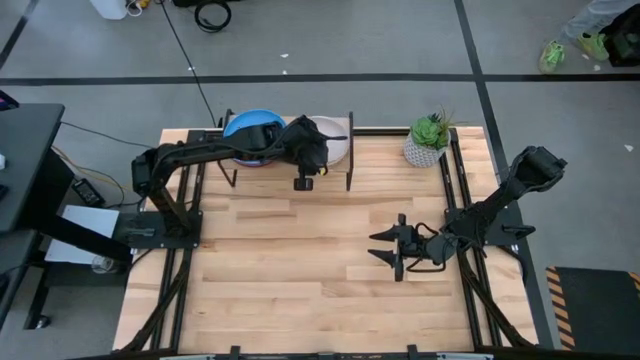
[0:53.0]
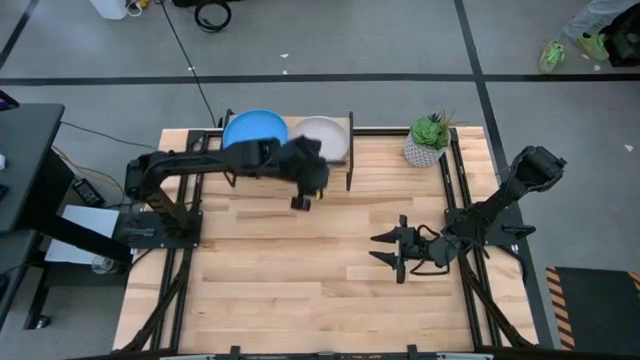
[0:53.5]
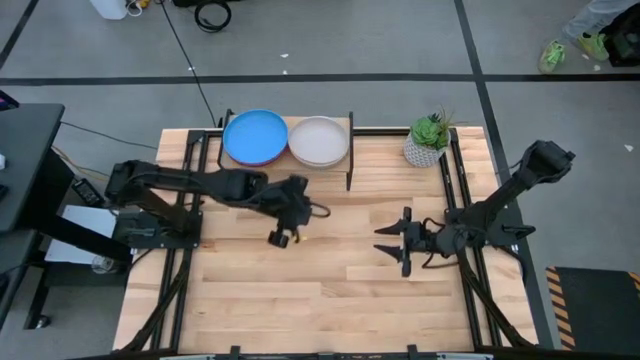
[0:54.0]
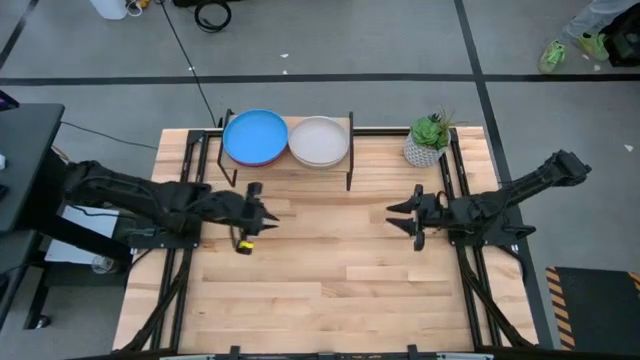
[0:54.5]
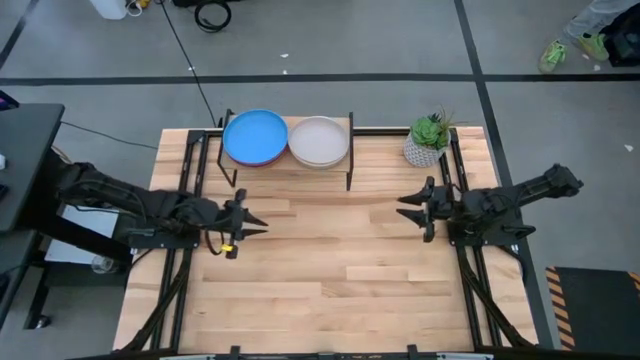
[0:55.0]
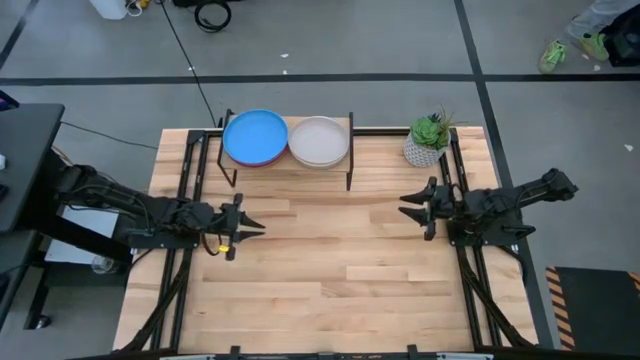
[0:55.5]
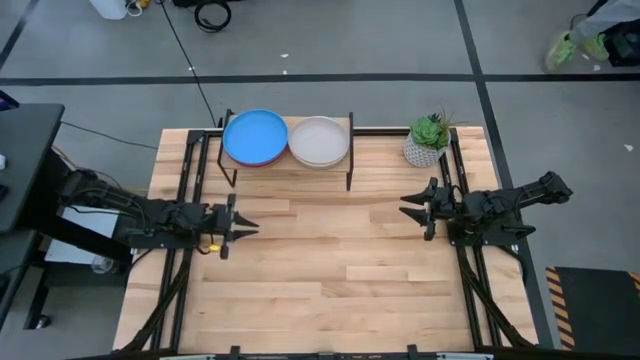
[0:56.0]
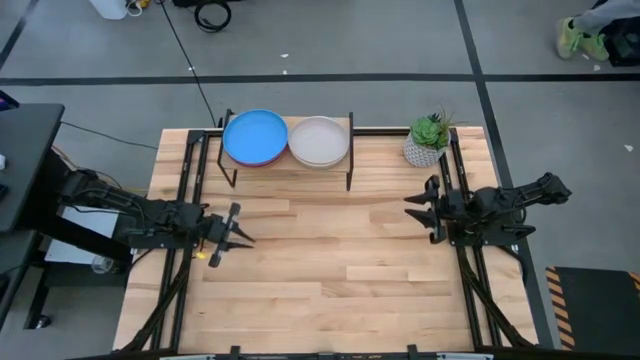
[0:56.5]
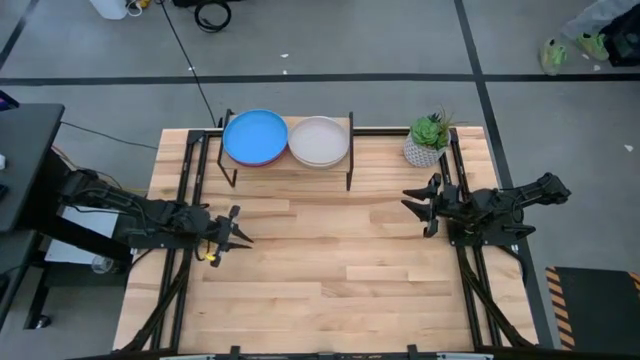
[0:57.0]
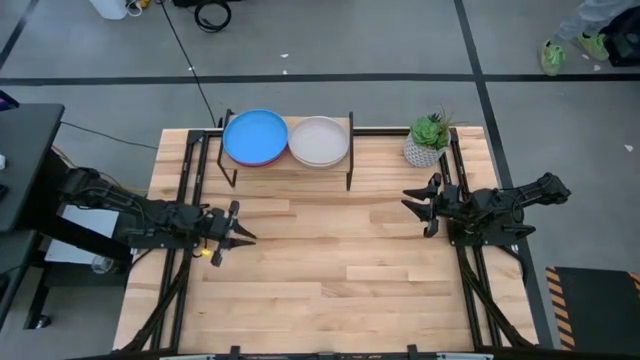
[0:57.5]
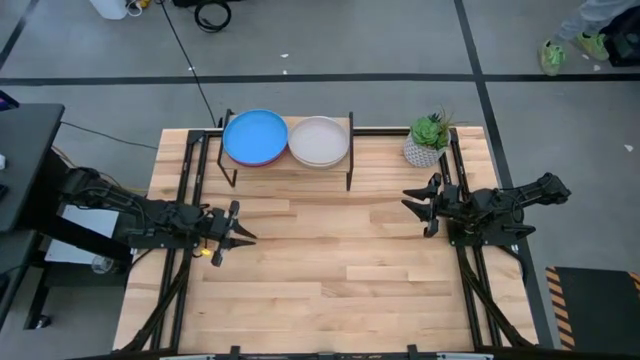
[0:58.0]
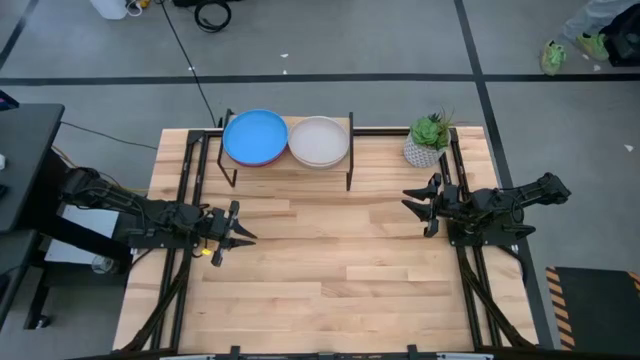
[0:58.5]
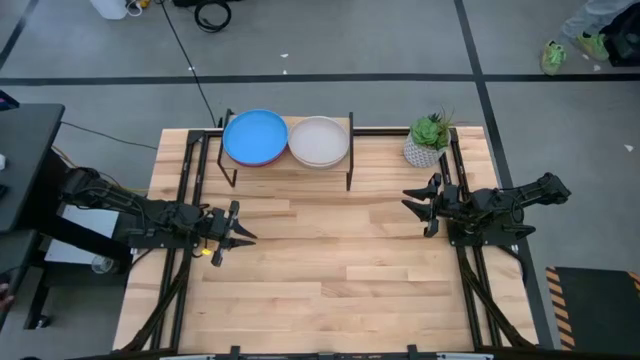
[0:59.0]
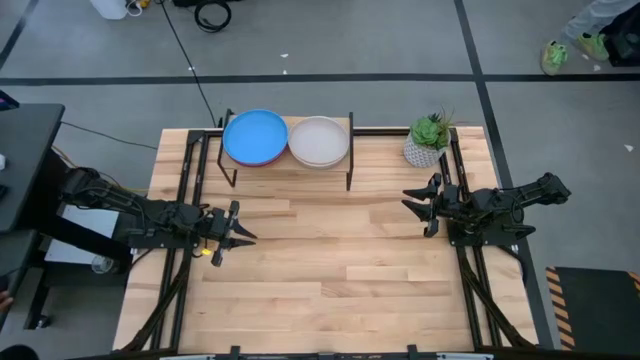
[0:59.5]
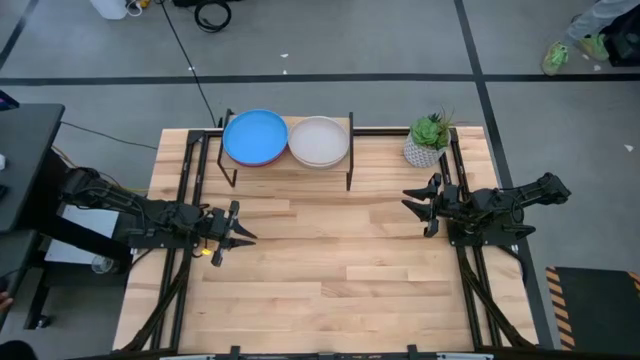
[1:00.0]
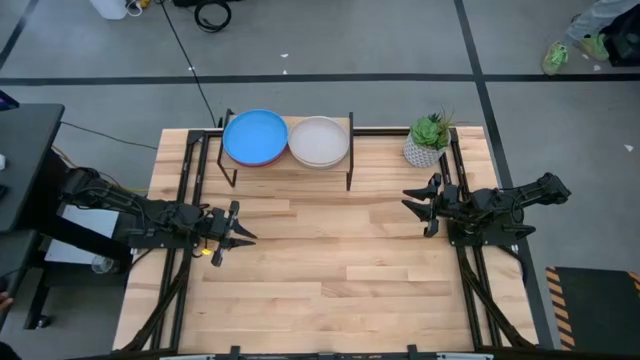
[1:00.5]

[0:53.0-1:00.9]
Task: Place and stack plates onto a shelf
Return to Home Position

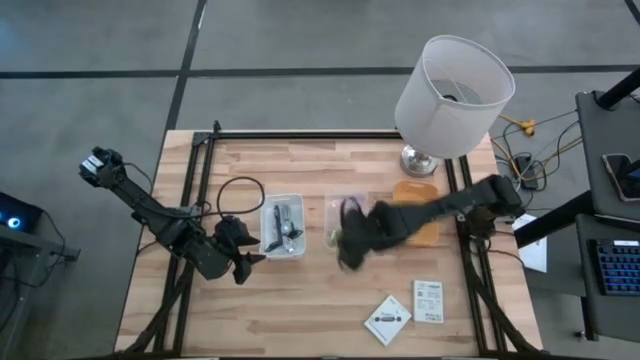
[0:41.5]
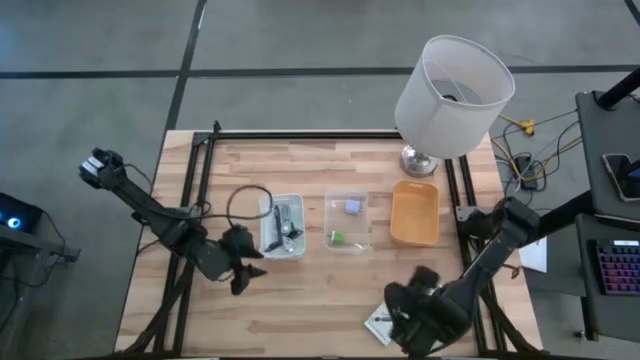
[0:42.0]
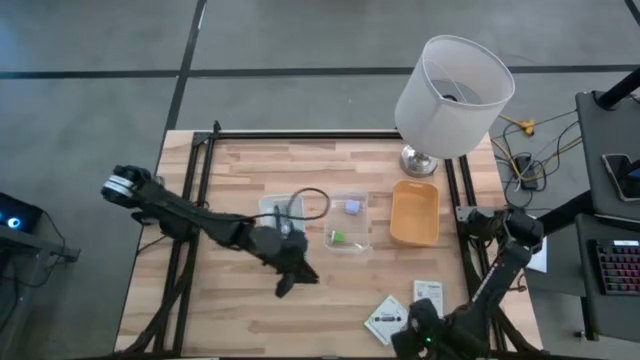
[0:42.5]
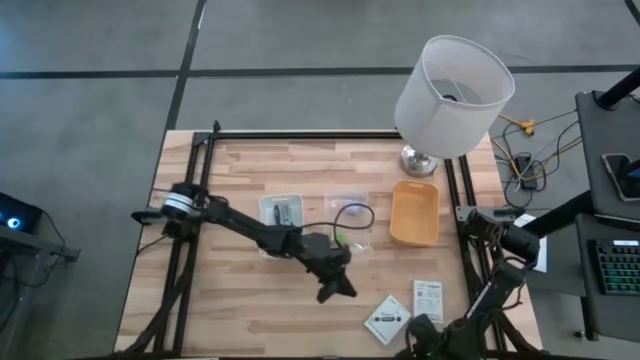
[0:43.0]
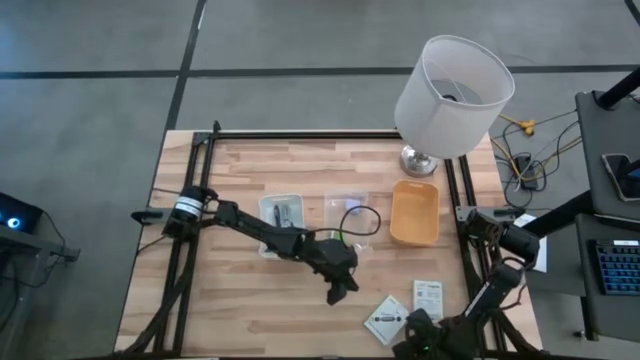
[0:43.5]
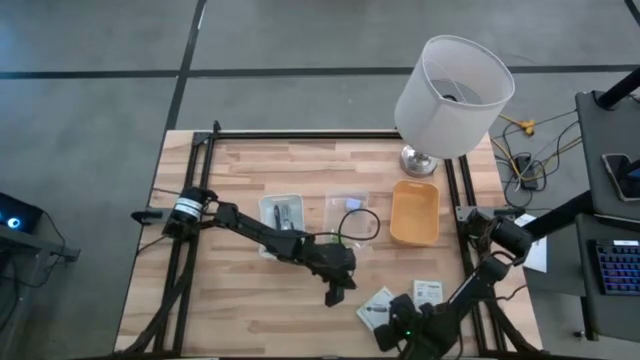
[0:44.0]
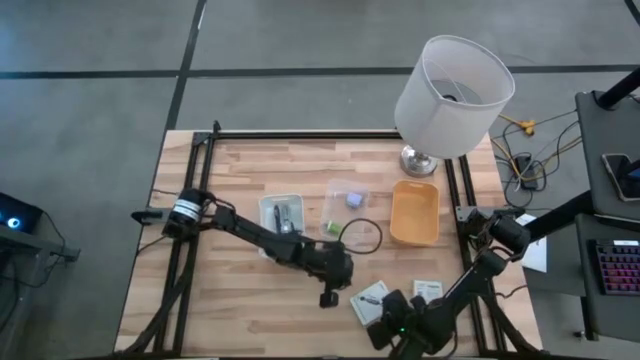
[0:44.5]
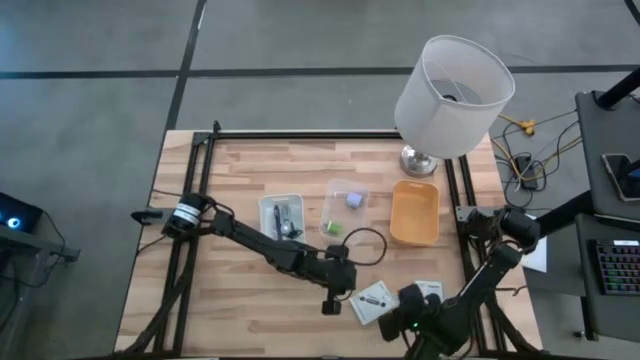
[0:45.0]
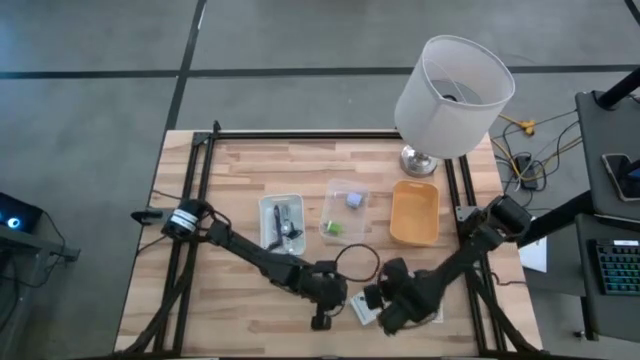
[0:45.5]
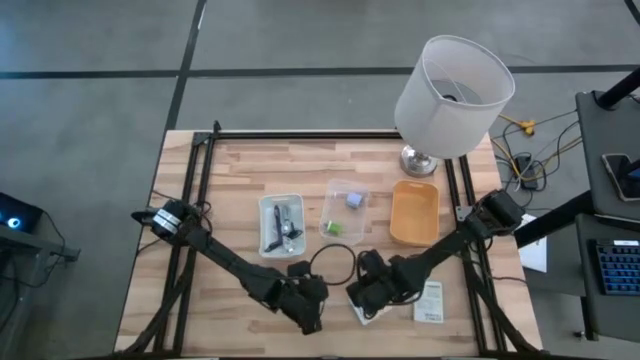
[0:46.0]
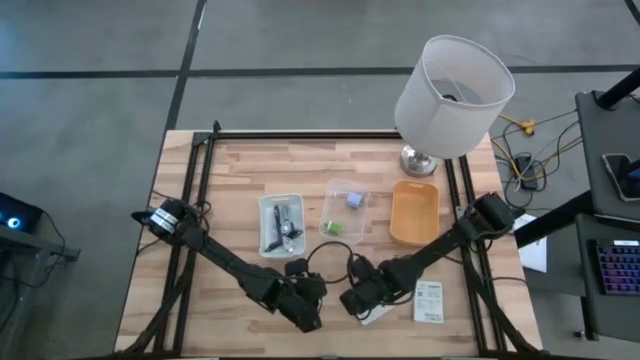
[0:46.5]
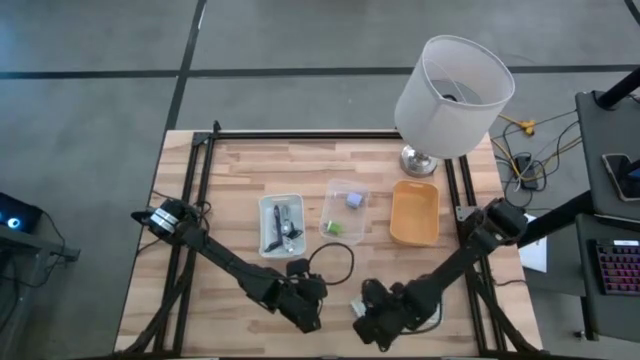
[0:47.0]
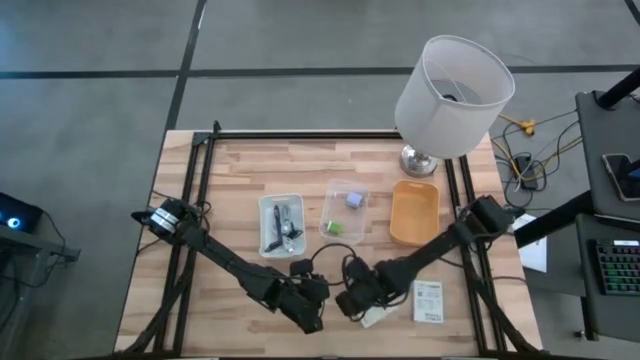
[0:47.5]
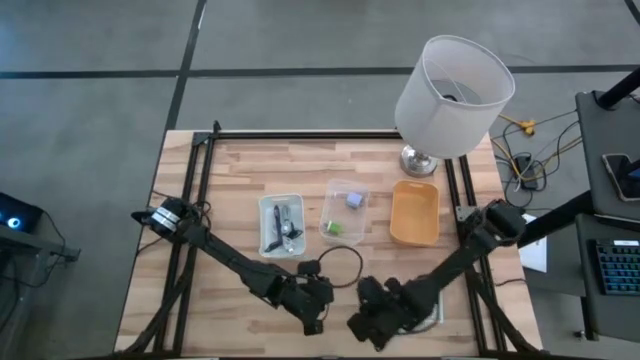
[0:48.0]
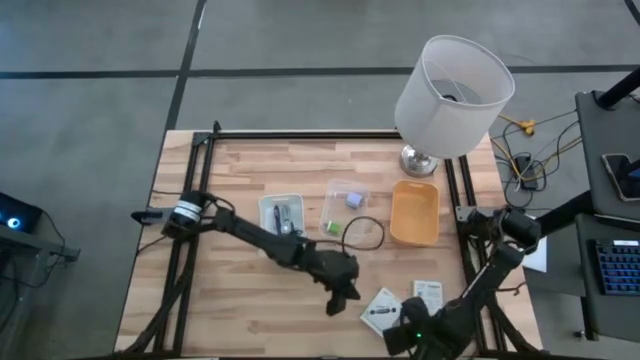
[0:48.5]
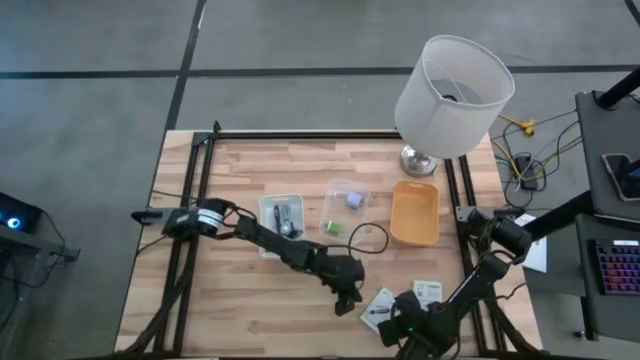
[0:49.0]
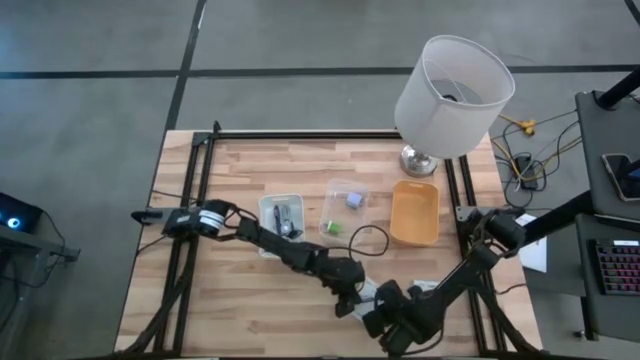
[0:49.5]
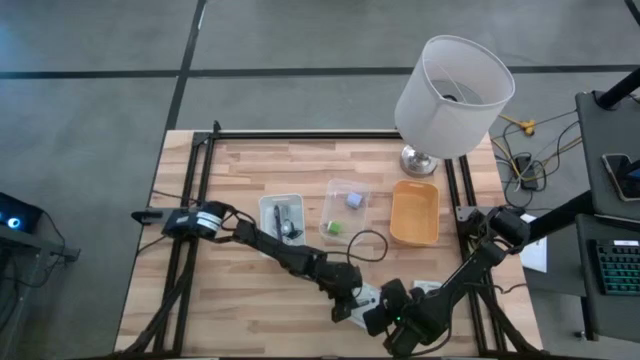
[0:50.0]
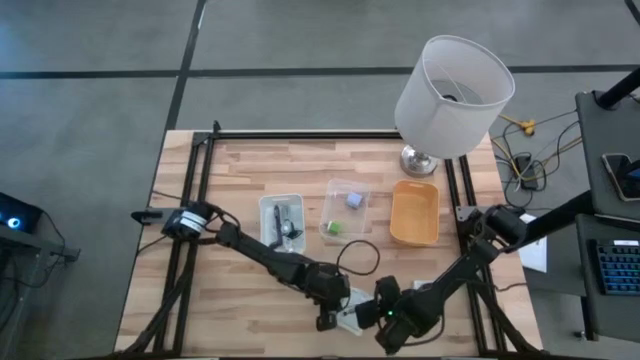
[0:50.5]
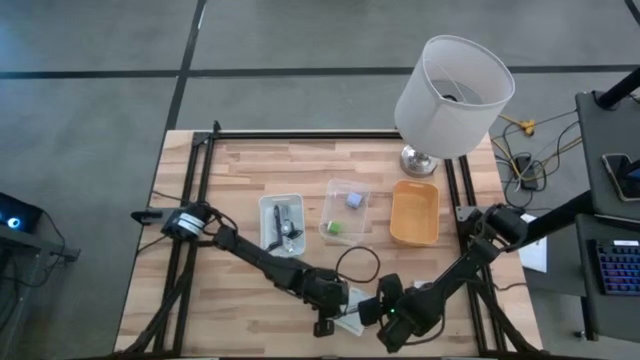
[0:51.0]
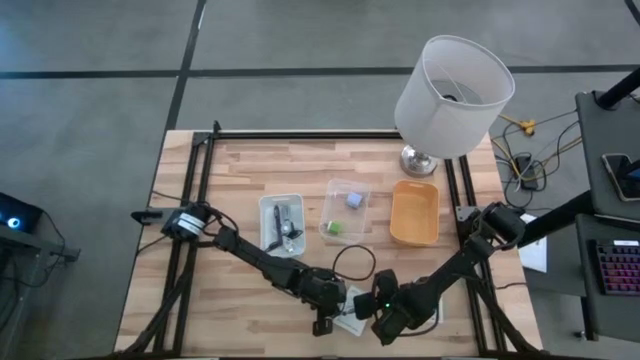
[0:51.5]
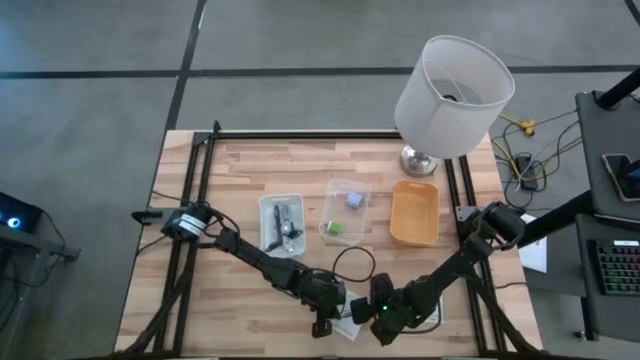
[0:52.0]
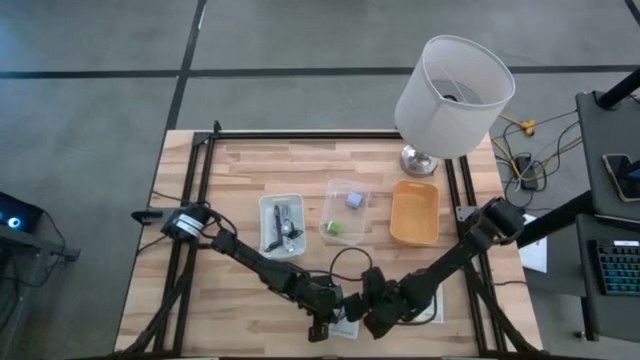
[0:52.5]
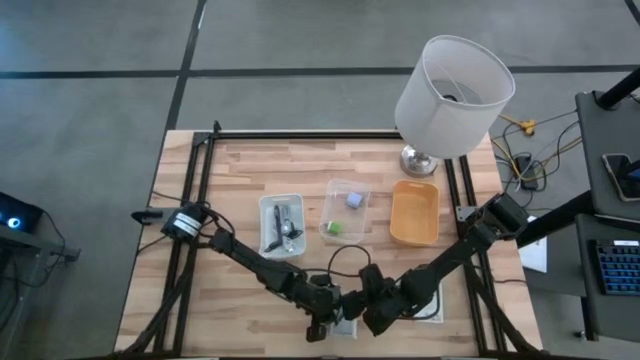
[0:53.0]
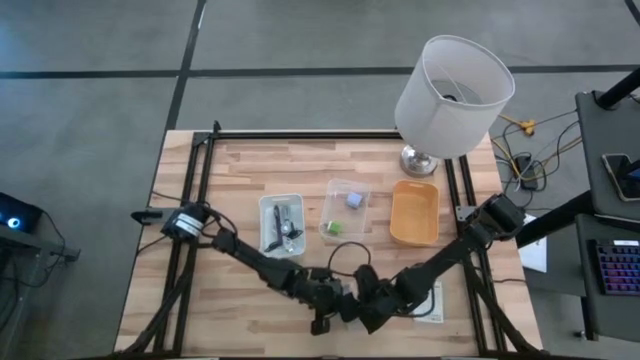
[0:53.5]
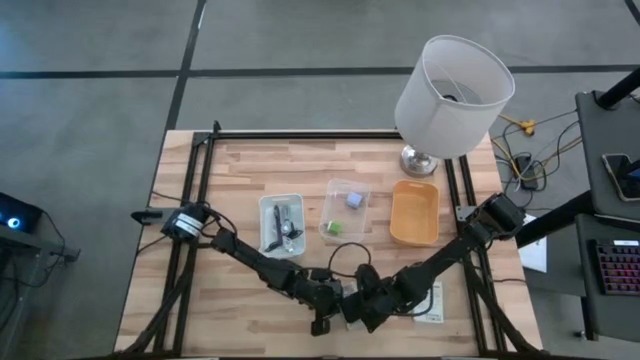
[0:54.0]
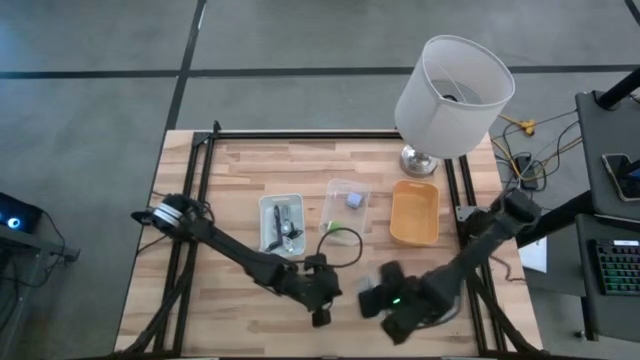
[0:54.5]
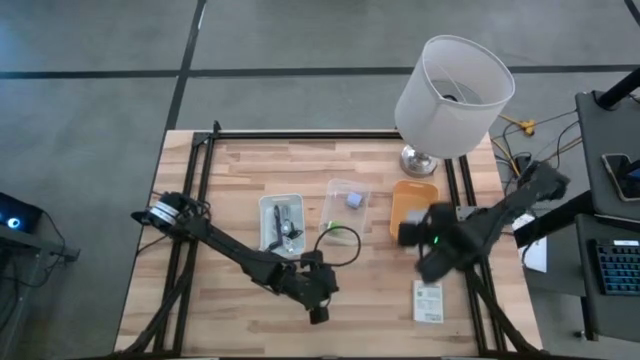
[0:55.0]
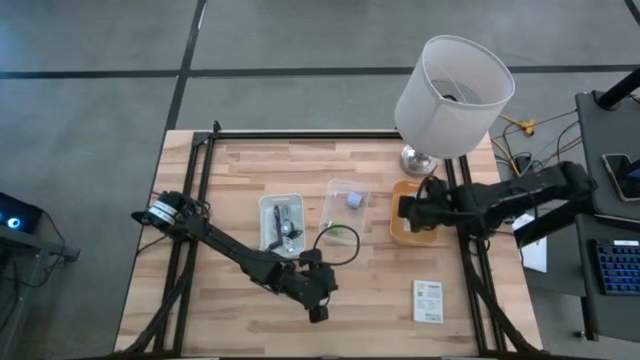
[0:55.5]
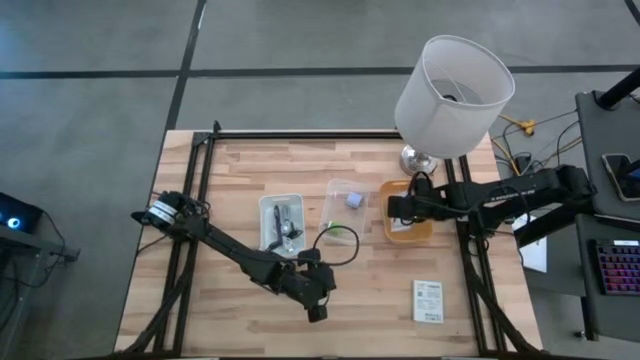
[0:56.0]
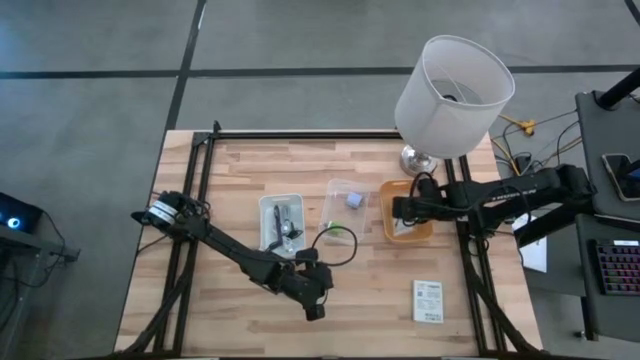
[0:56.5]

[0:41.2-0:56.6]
Task: Pick and place items into bin
Put the left card reader box into the yellow bin
